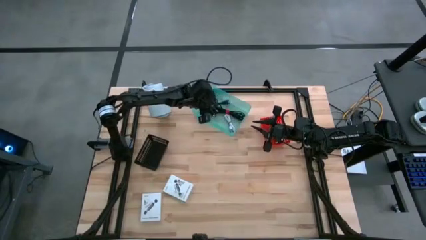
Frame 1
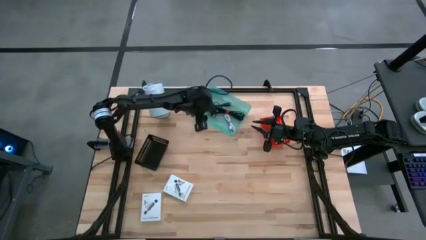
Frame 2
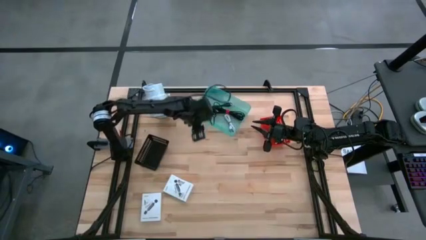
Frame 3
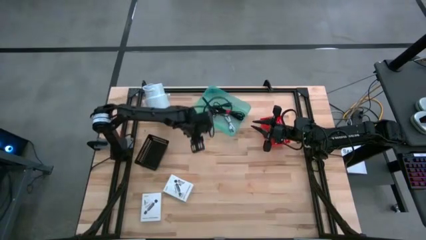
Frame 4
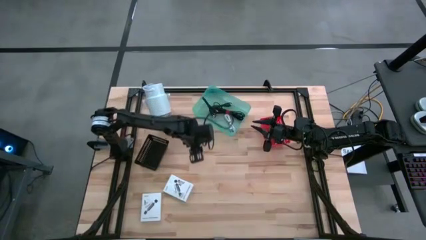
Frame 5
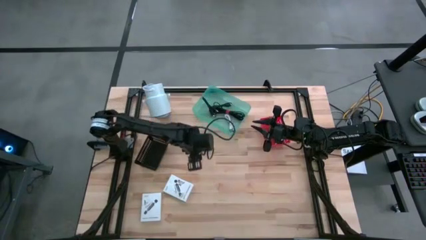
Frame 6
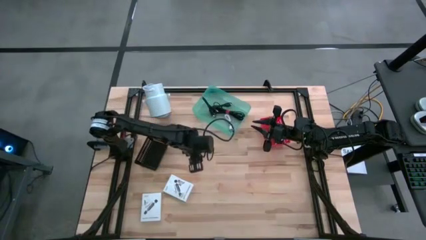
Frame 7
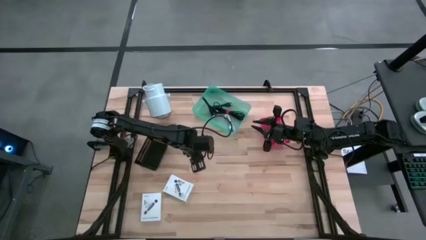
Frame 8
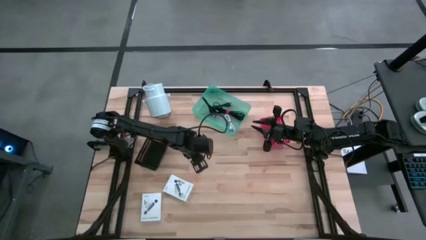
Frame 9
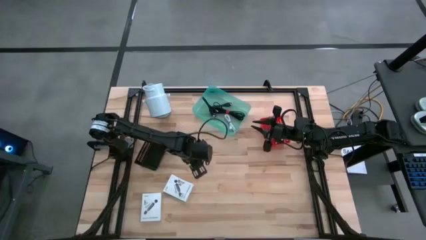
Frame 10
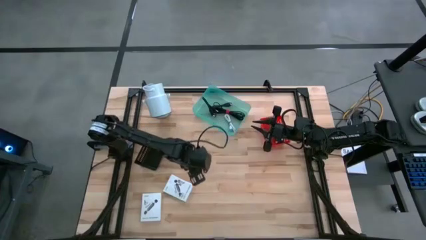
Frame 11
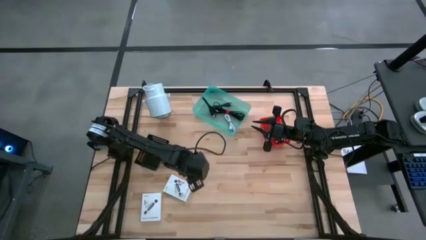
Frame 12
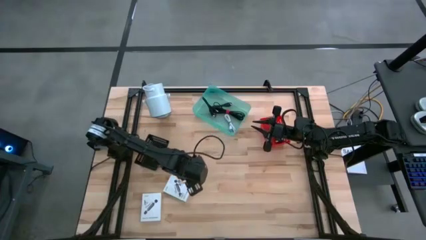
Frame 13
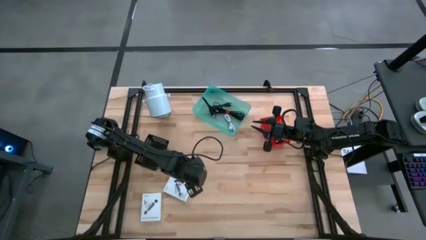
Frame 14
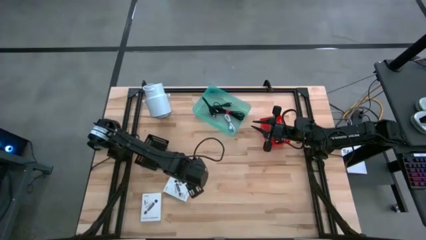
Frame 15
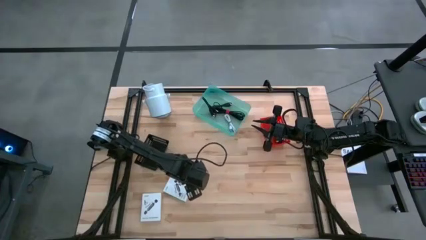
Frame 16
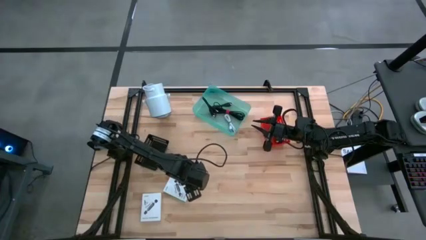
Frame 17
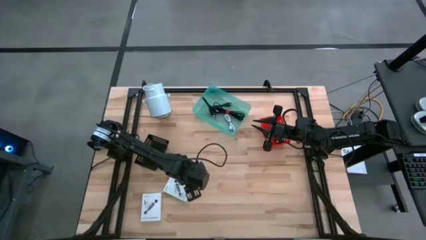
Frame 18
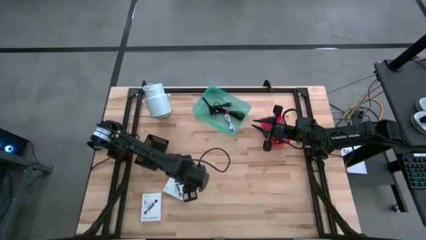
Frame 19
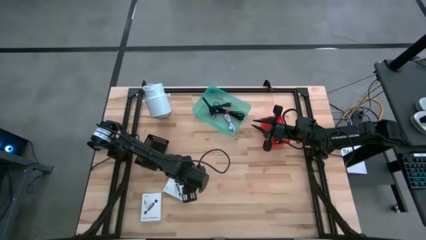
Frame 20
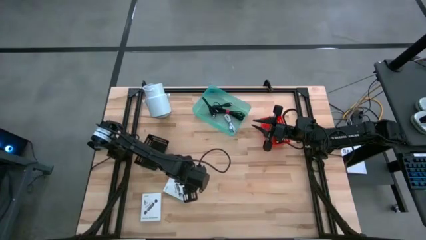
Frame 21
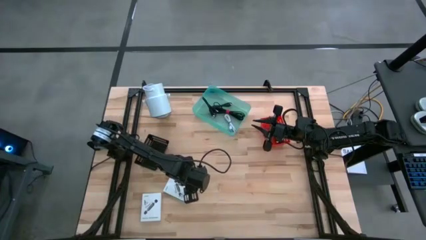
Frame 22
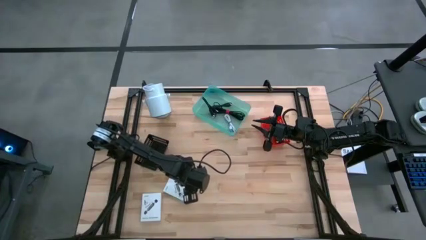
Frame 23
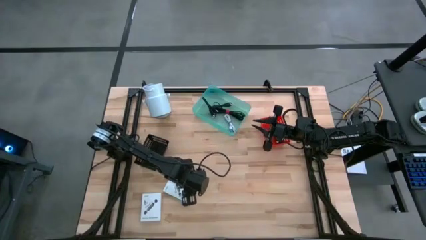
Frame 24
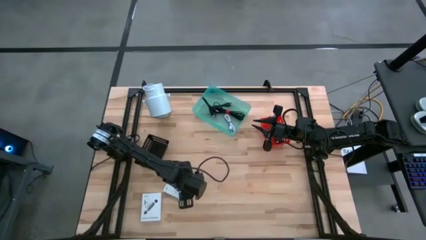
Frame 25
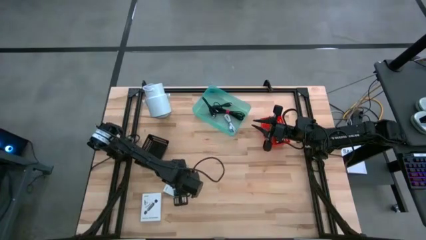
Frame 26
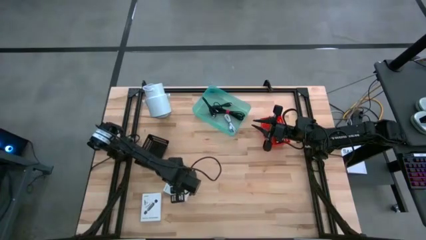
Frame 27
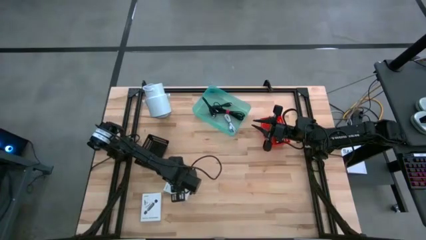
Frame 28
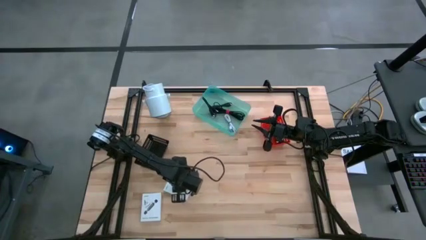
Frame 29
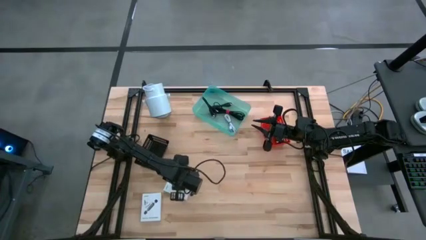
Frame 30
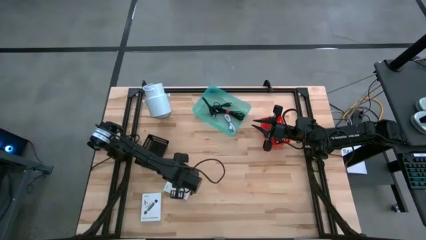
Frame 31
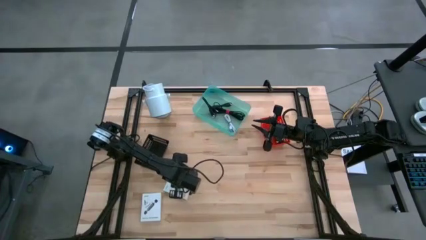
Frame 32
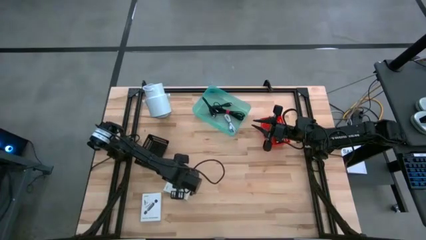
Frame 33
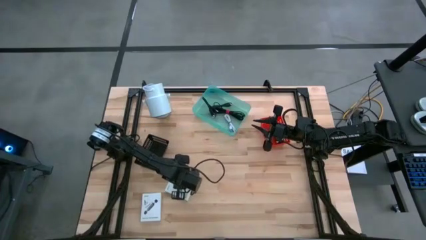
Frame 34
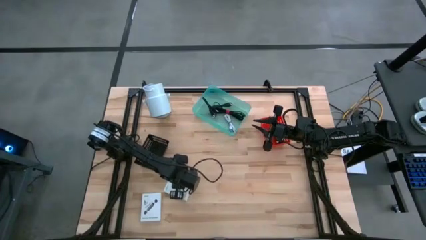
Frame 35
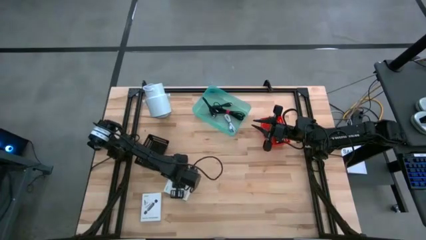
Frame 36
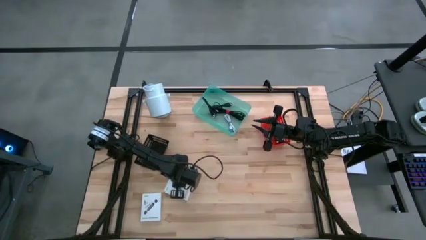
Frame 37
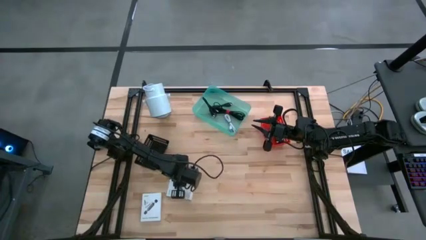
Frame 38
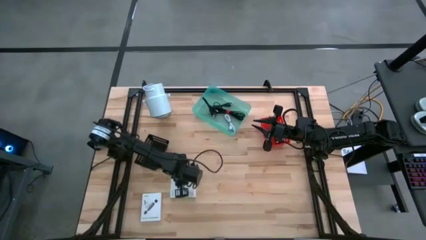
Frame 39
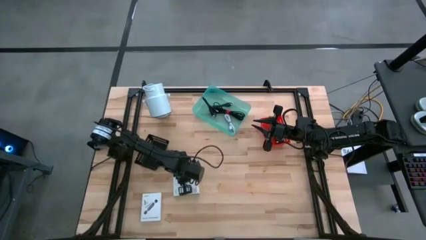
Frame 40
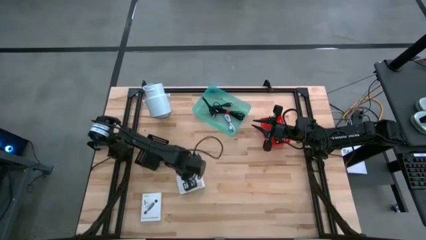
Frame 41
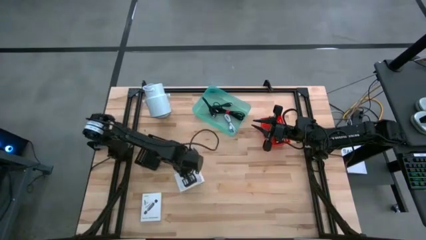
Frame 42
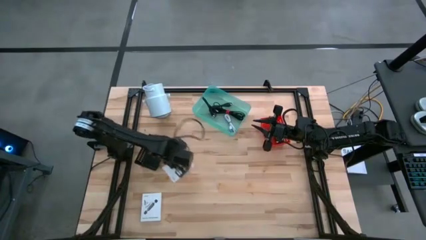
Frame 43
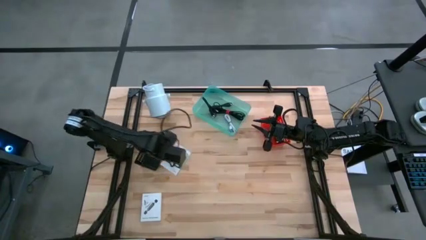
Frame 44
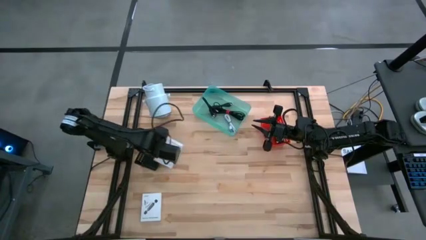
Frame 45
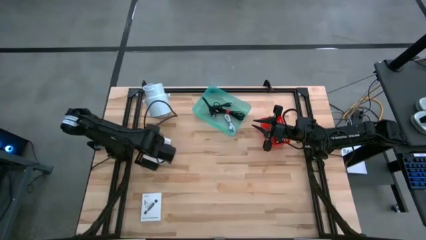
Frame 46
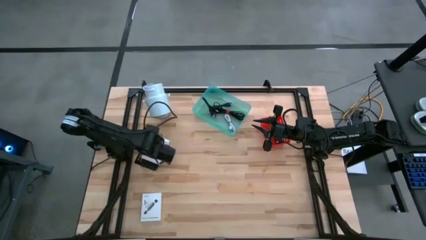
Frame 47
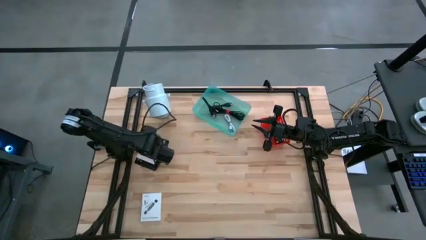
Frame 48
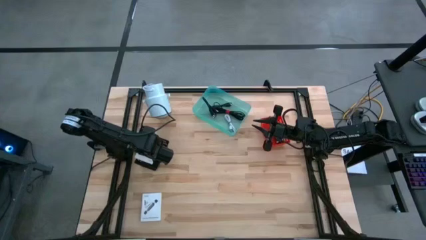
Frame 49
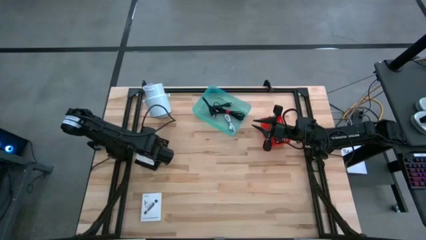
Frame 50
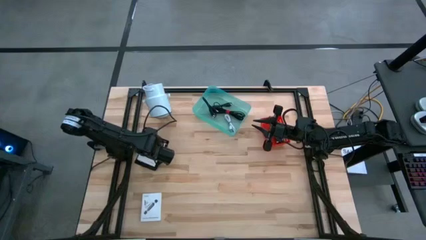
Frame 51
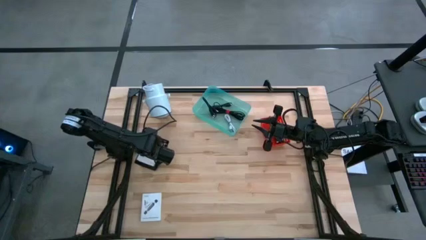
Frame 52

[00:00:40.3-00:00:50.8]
Task: Pick and place items into bin
Put the top white card reader box into the black bin

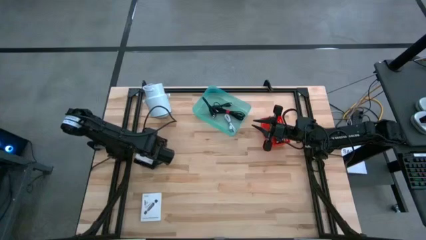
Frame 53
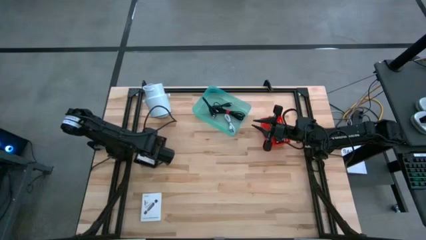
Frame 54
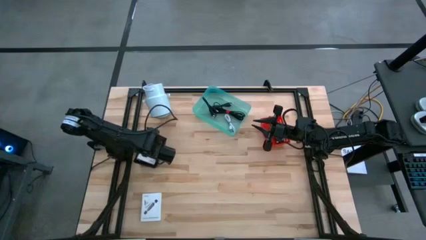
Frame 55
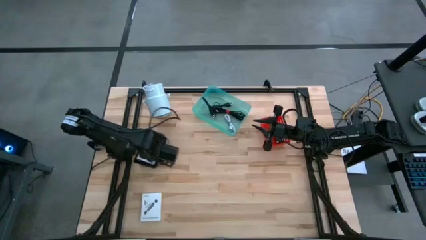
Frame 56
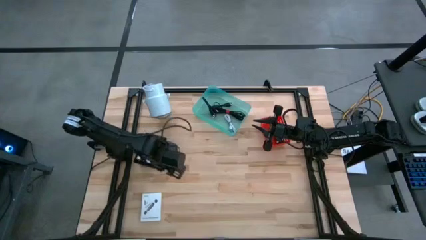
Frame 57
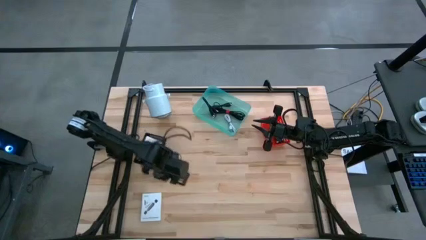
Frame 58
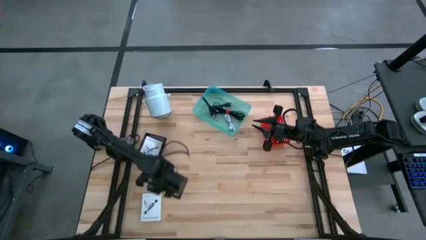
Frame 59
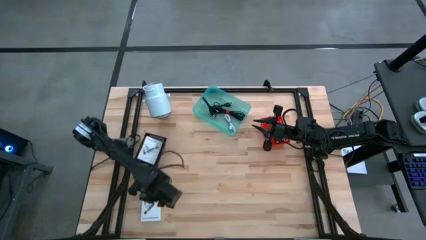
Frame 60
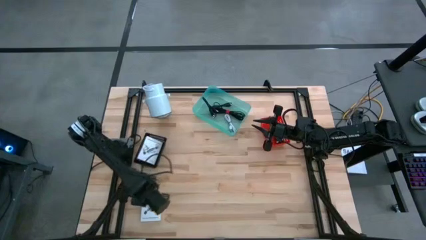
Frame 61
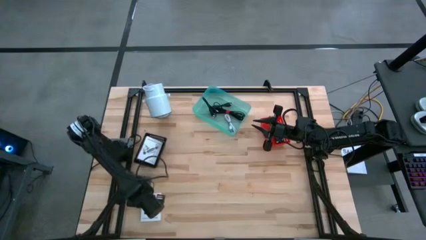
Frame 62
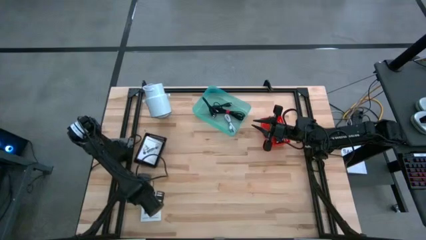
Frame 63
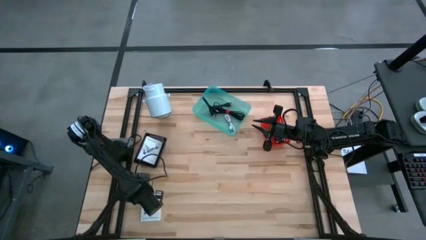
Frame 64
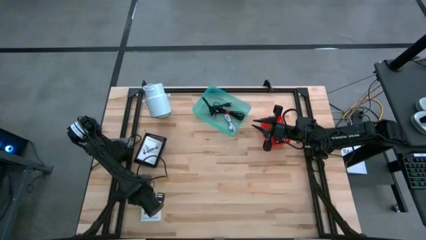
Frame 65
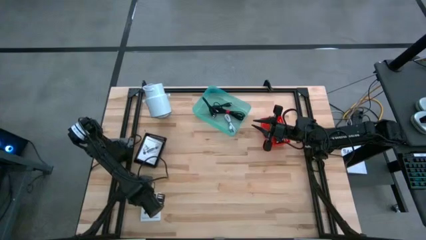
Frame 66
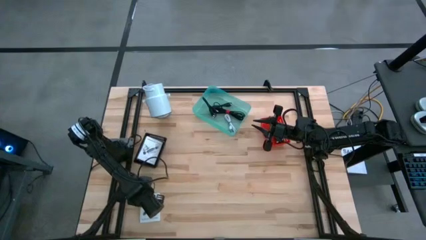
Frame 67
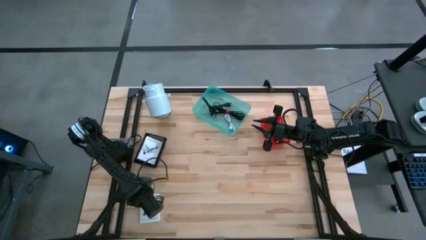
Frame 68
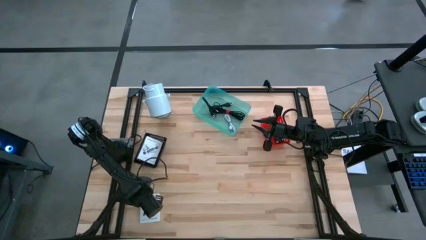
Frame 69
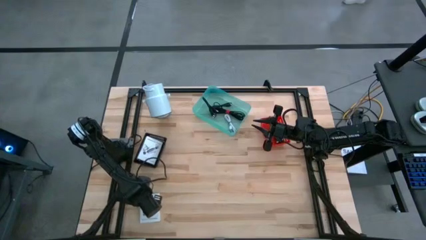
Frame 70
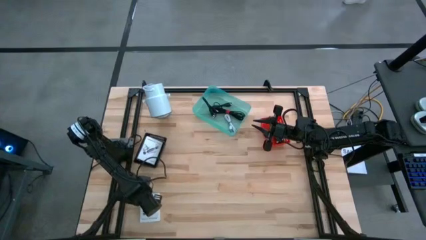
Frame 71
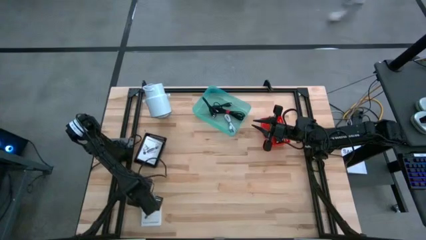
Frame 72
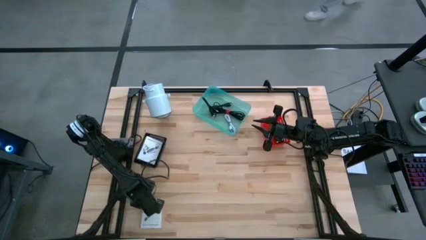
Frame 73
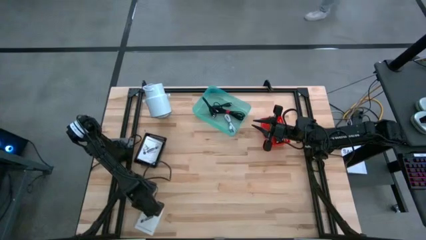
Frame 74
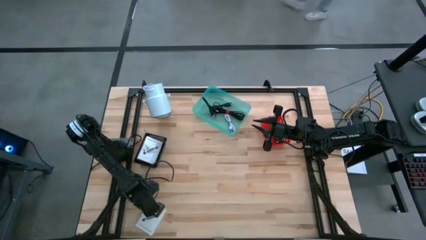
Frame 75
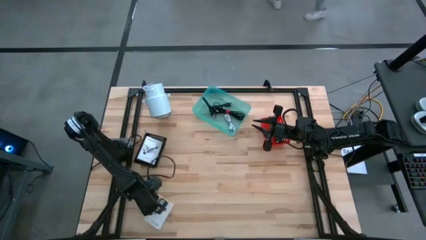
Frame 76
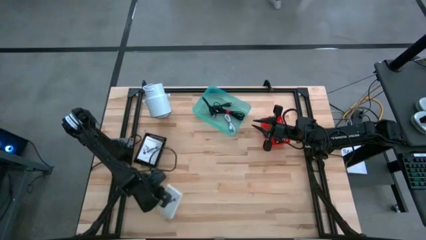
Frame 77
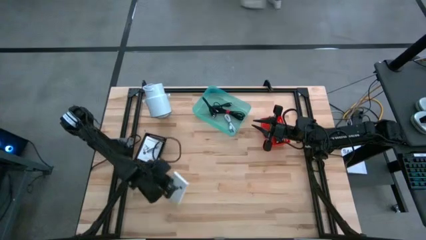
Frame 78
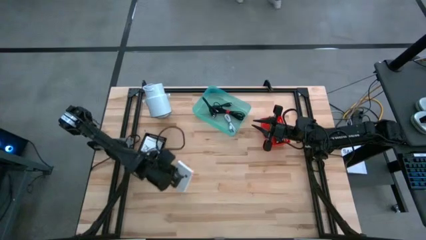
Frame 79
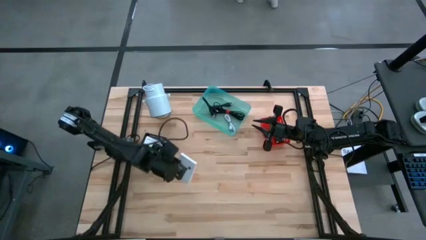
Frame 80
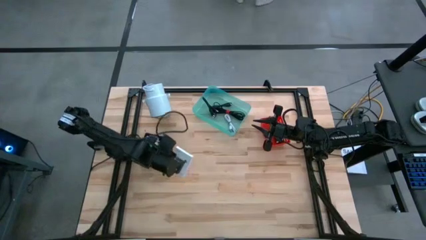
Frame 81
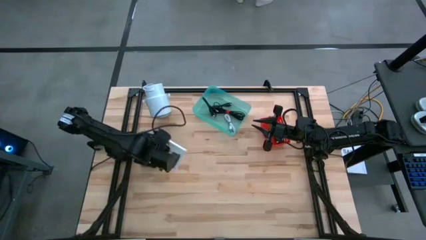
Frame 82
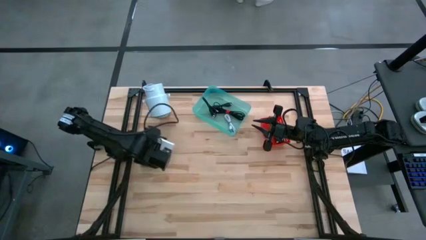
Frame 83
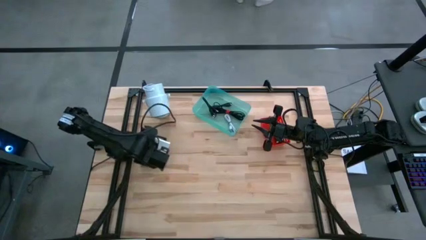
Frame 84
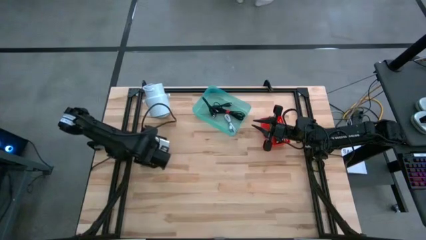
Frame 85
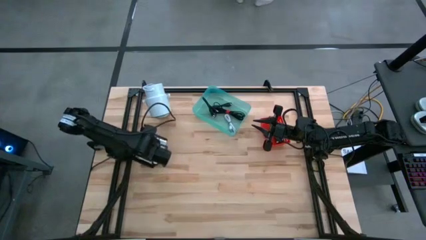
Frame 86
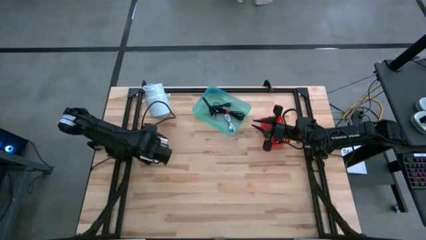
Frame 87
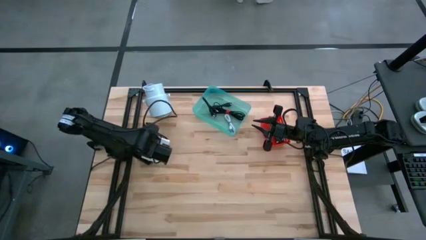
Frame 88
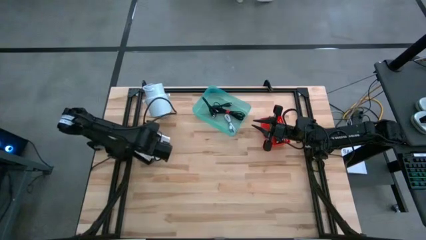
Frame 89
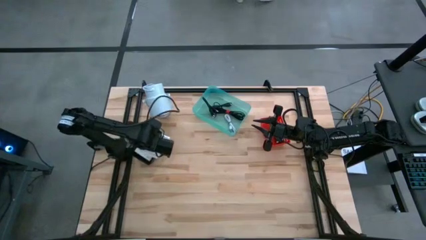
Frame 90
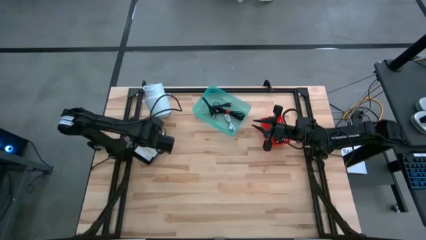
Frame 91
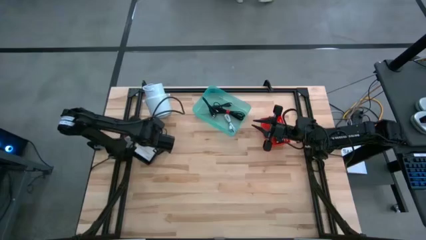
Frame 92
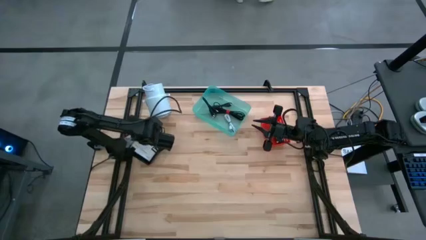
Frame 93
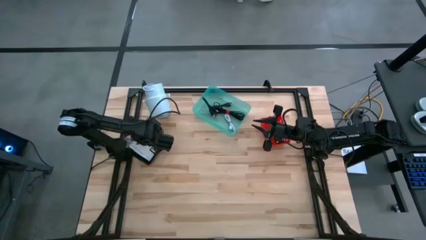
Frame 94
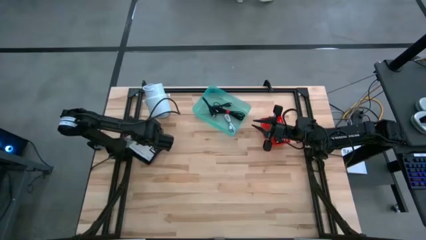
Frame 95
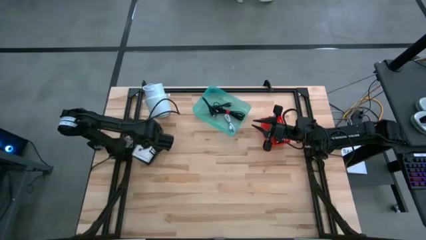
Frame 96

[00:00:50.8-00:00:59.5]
Put the white card reader box into the black bin
